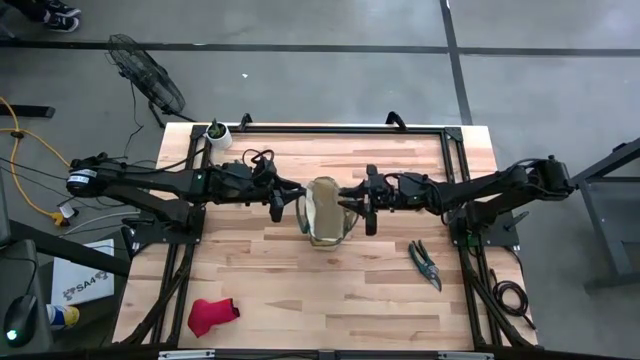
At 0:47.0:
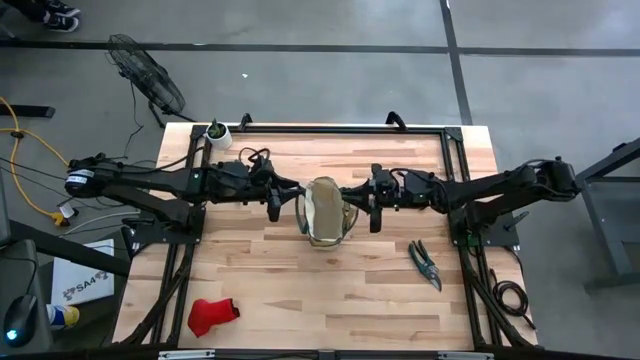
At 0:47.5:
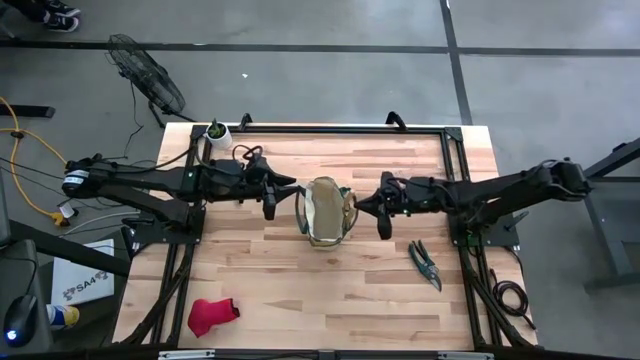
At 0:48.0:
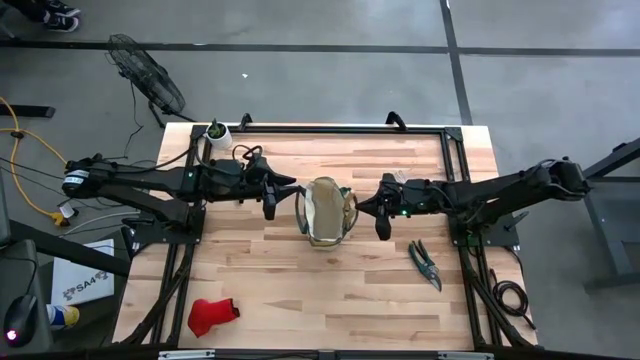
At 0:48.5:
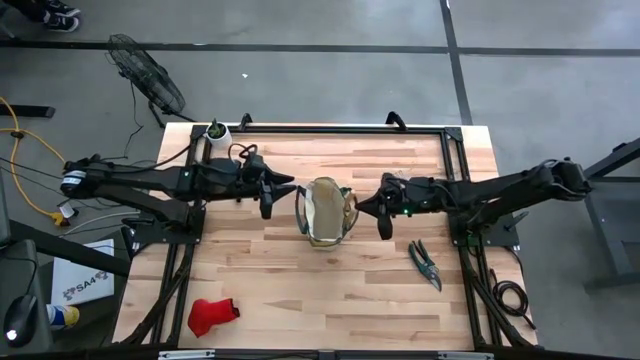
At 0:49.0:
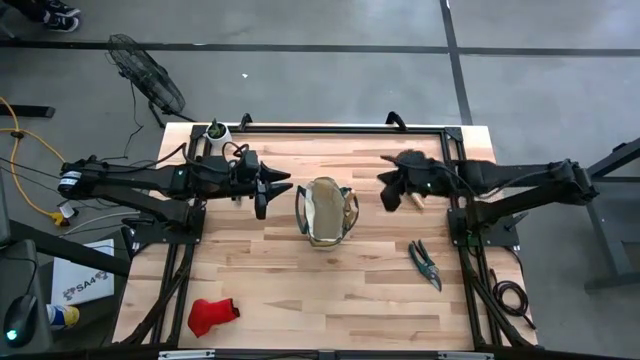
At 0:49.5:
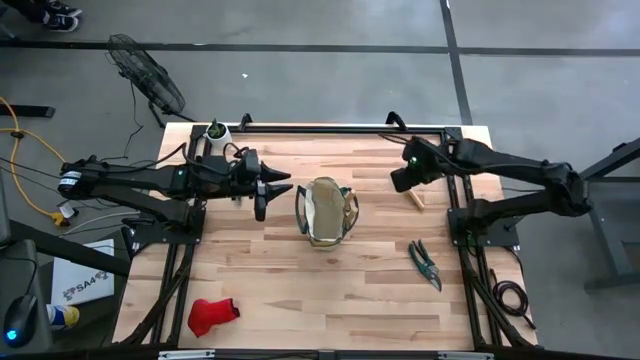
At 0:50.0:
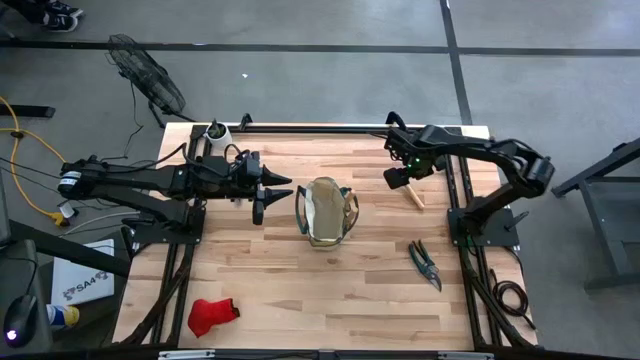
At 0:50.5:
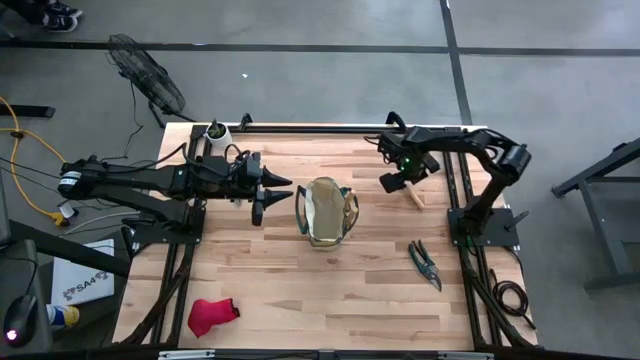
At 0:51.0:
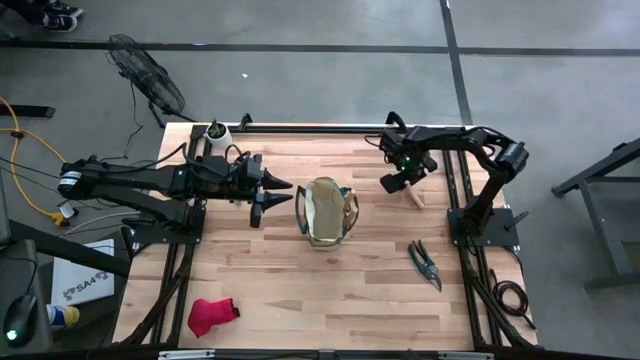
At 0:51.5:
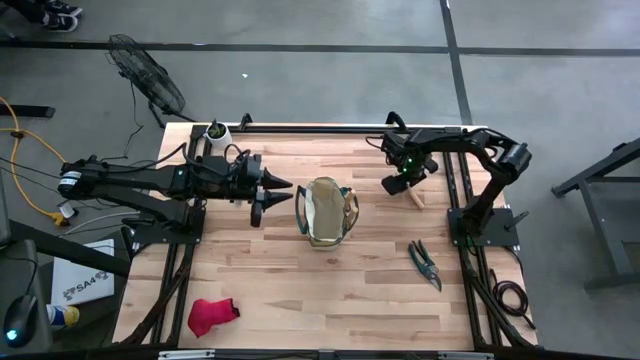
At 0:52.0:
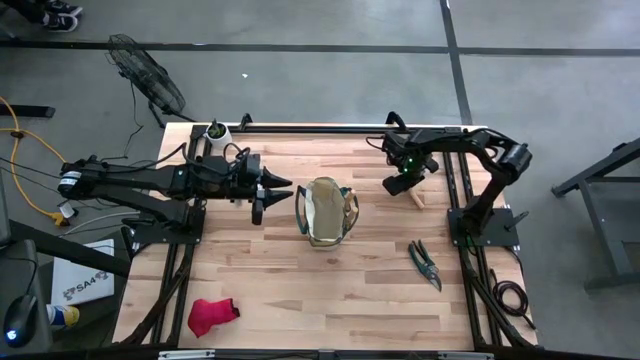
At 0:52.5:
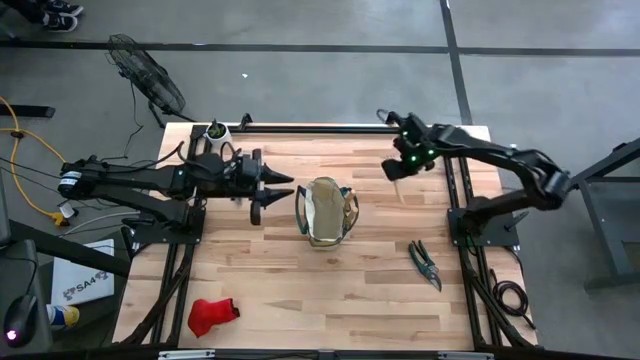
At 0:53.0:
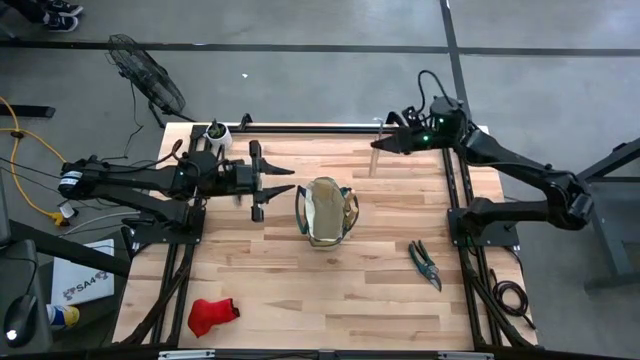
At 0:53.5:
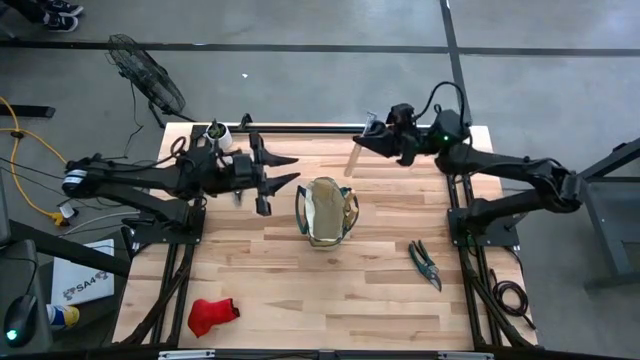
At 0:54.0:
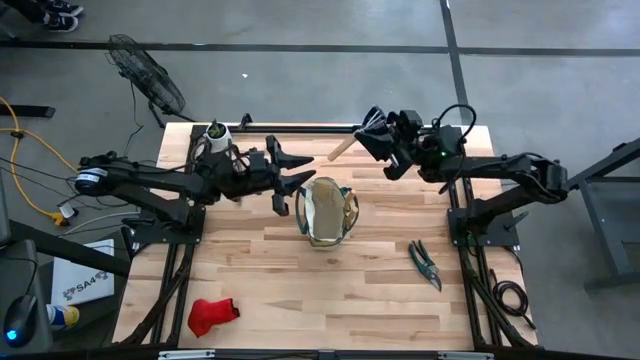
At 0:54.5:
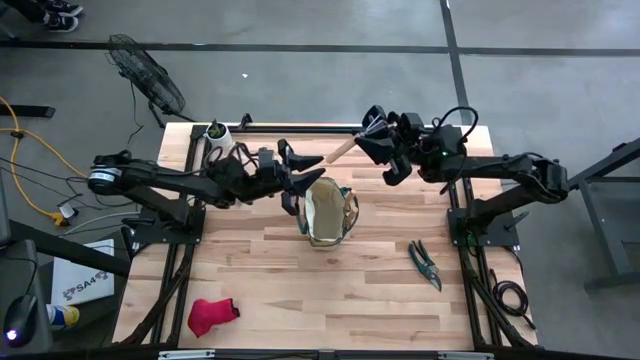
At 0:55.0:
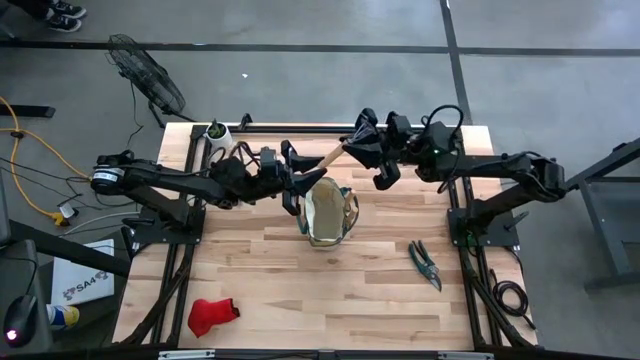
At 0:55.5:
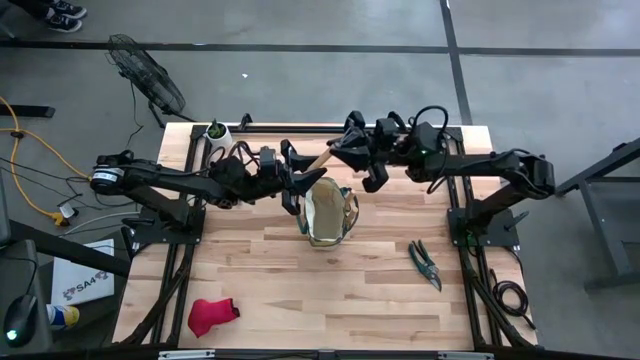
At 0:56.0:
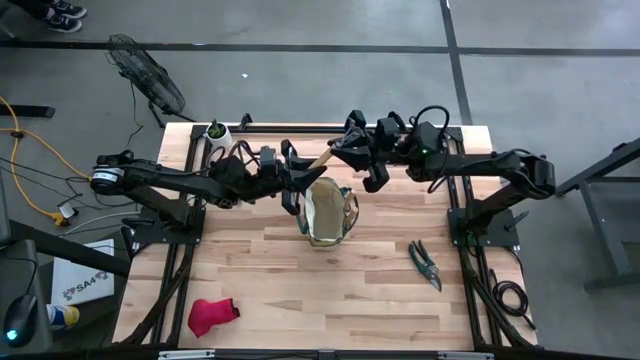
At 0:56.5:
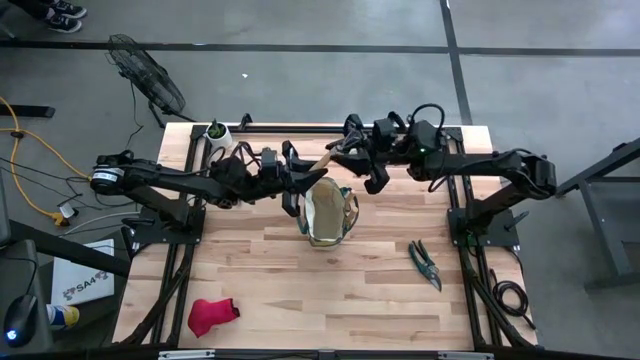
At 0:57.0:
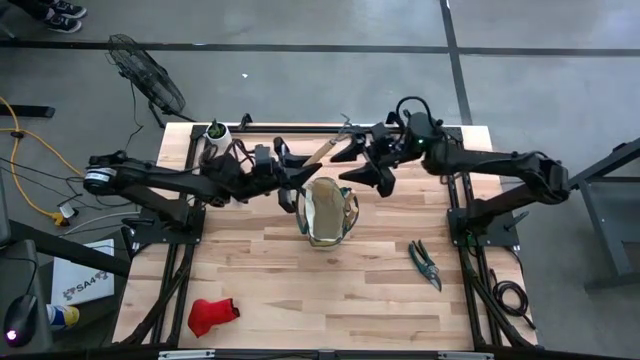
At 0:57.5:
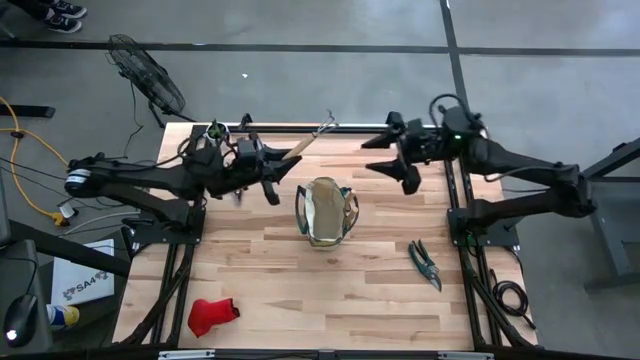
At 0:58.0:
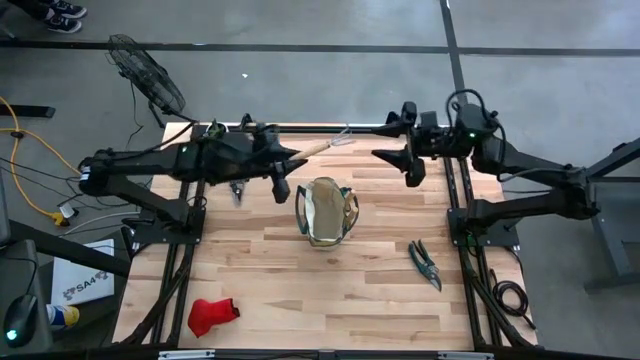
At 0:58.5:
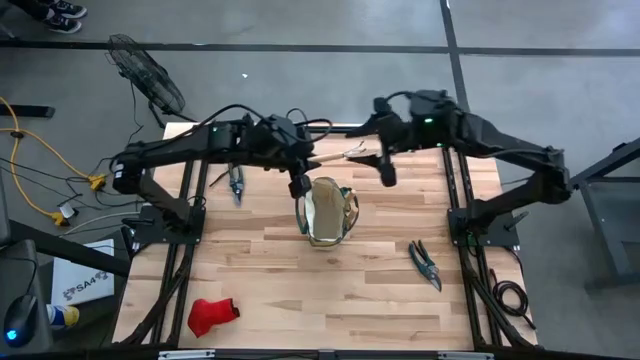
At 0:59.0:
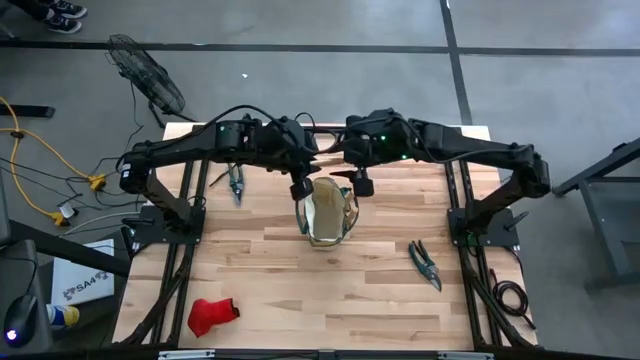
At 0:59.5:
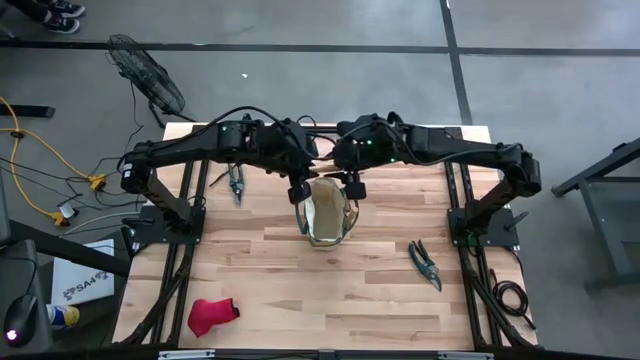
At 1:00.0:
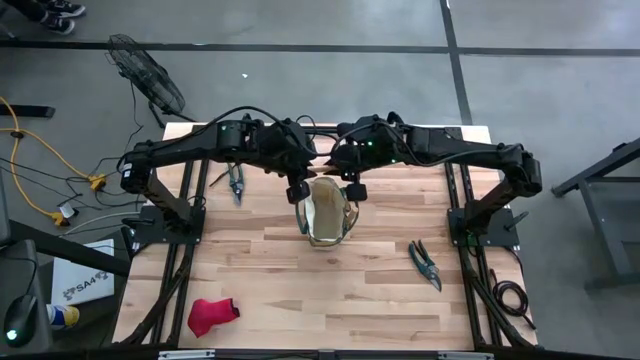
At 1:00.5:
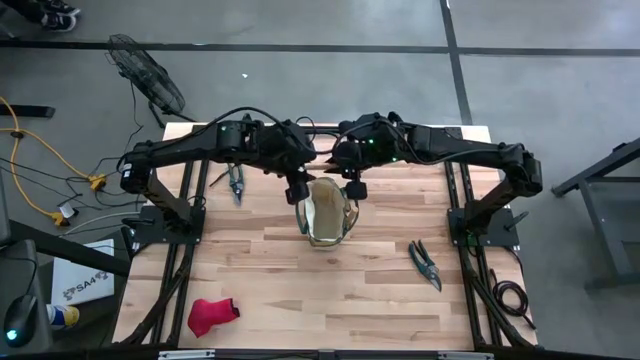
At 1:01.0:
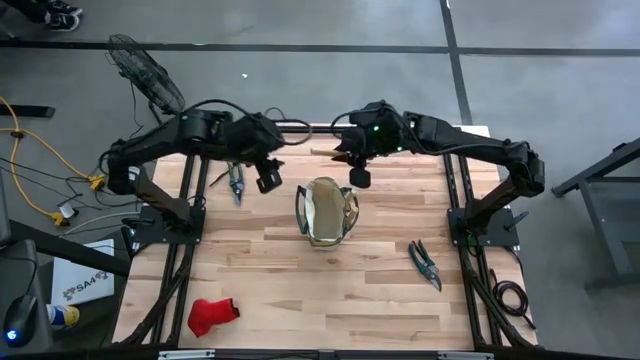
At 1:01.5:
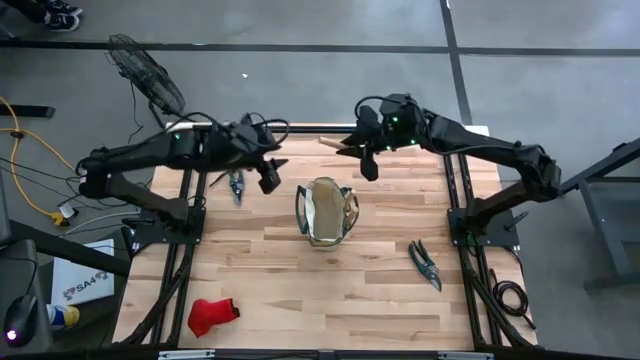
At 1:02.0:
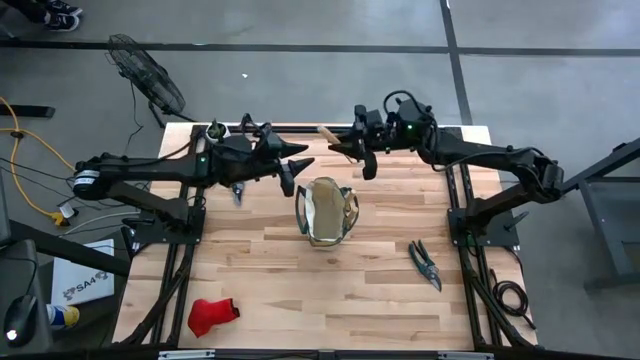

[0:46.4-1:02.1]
Task: Pick & Place Garden tools in Gardening bag
Put the hand rake into the gardening bag

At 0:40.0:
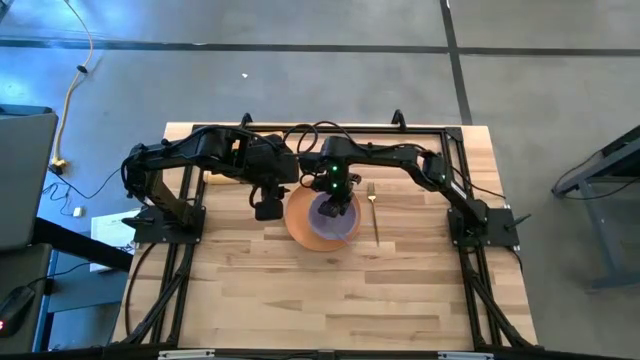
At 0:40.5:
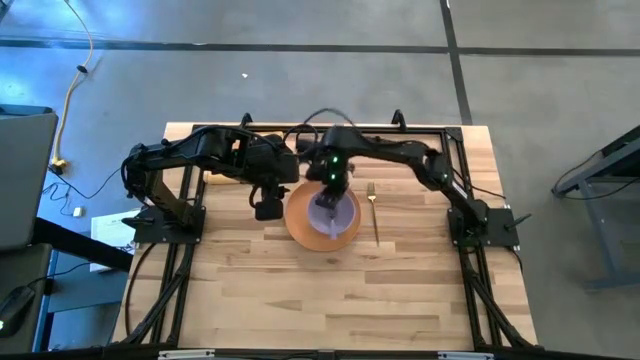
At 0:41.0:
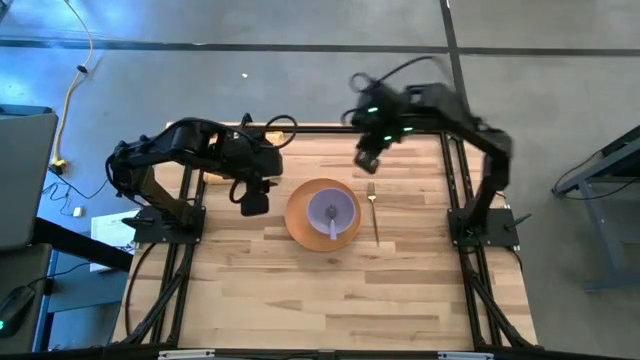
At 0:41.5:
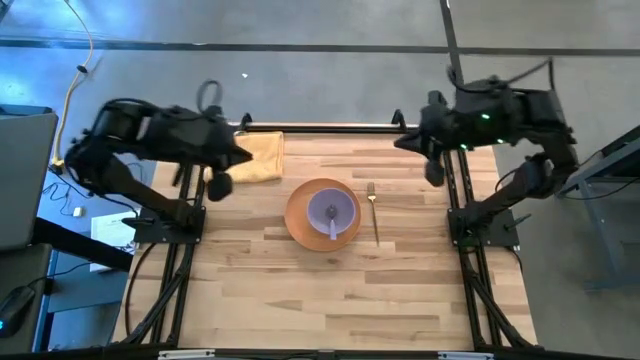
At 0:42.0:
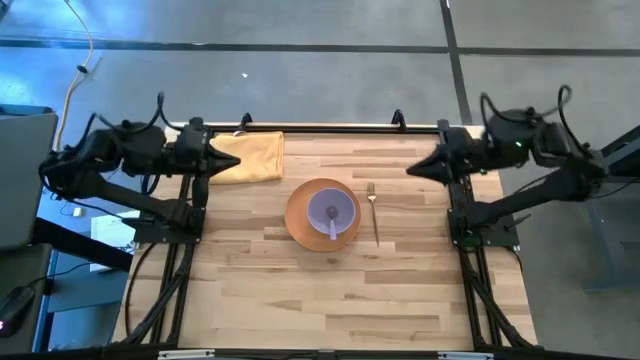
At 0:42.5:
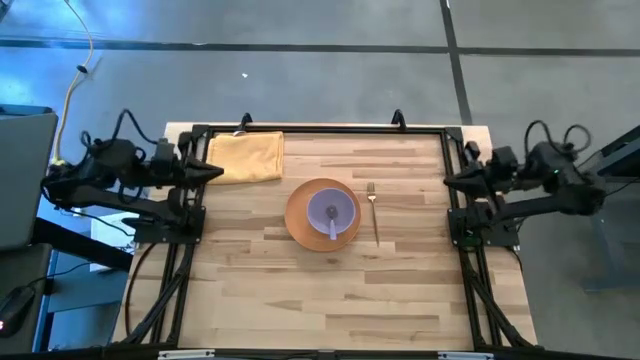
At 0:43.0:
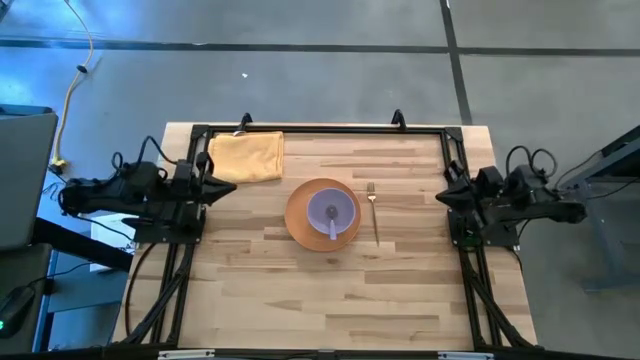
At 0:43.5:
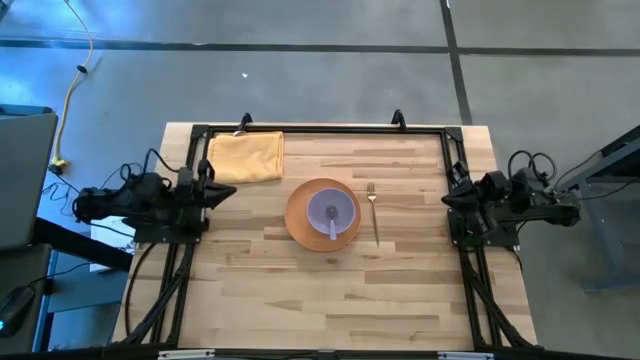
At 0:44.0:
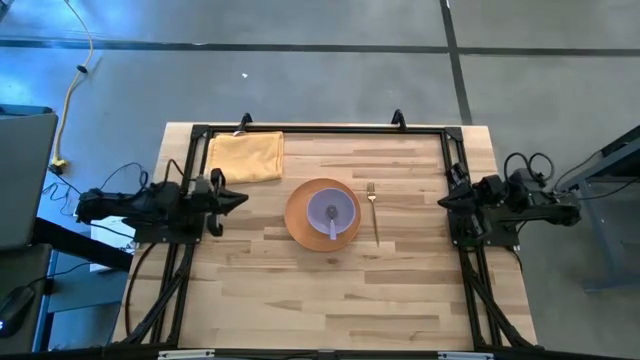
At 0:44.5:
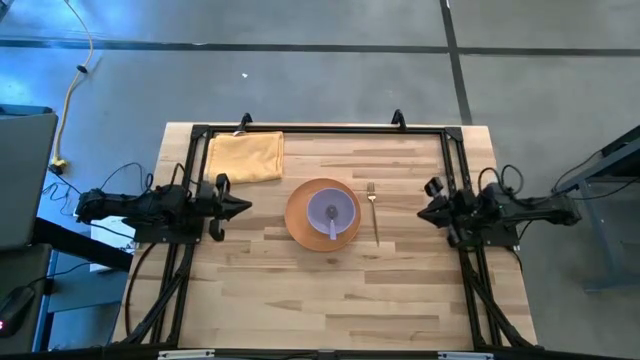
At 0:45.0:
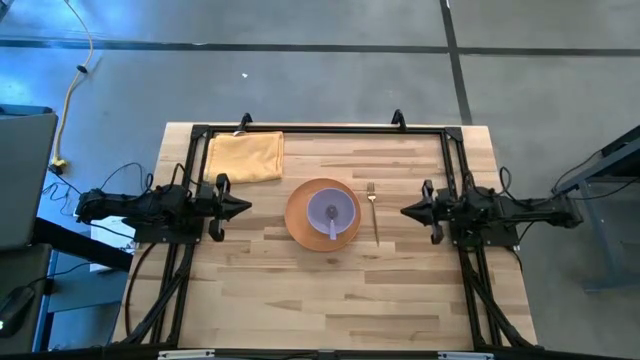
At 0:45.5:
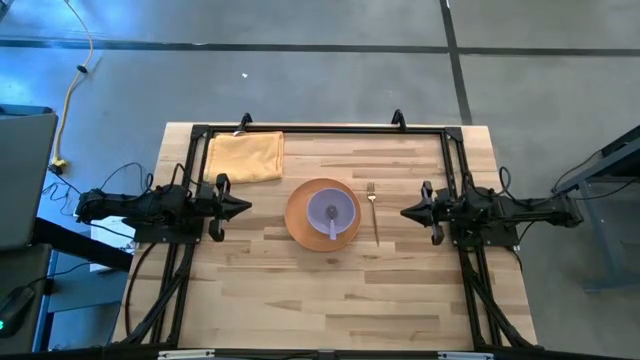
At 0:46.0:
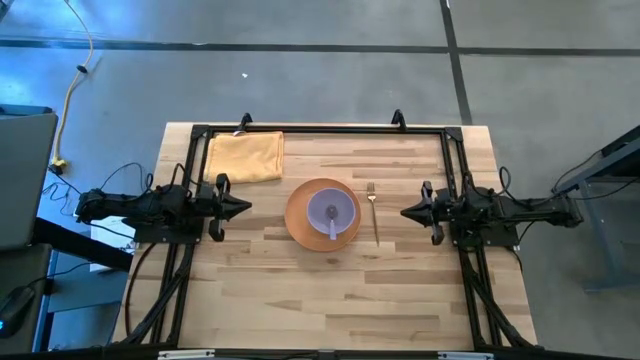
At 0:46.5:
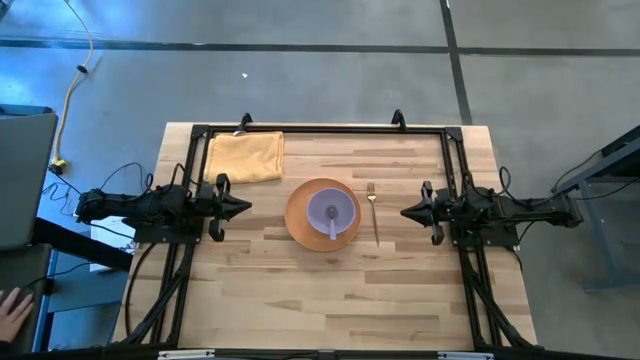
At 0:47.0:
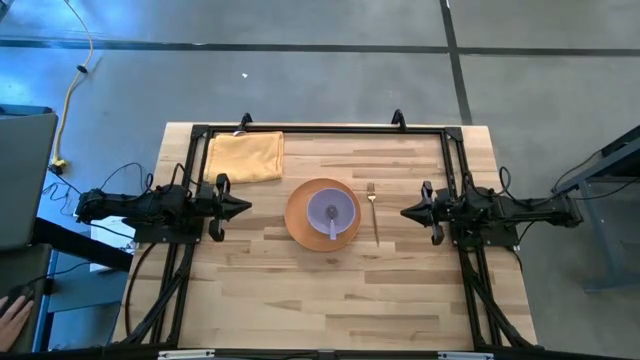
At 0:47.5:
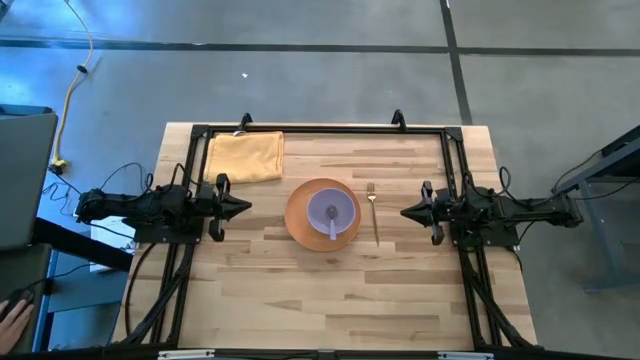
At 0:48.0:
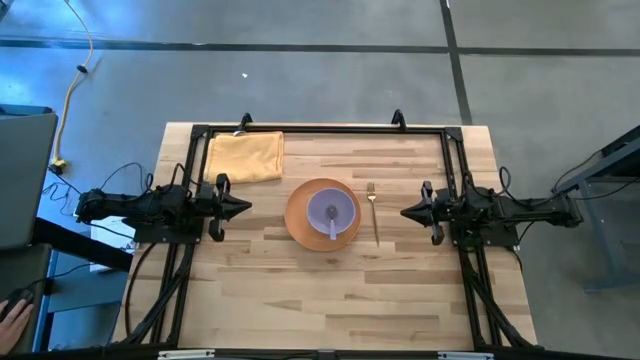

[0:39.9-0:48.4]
Task: Set table place
Return to Home Position
